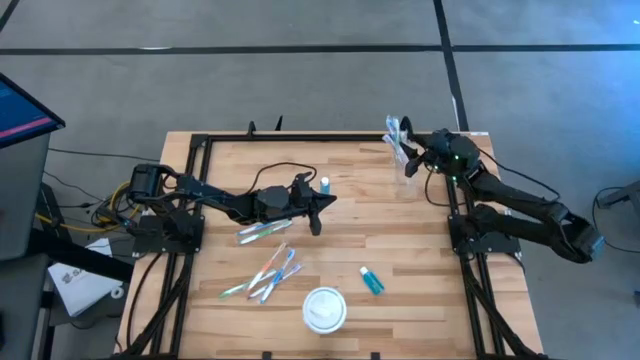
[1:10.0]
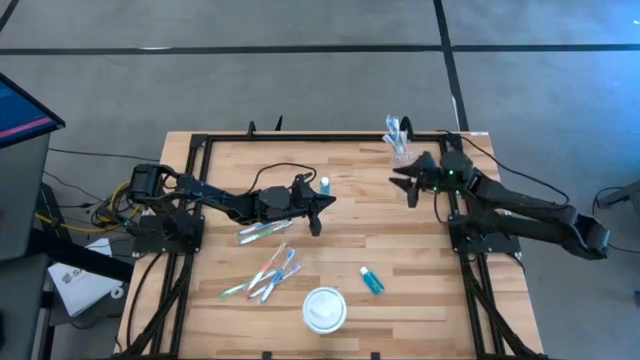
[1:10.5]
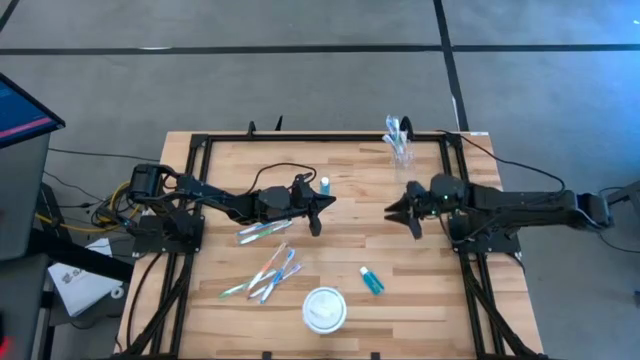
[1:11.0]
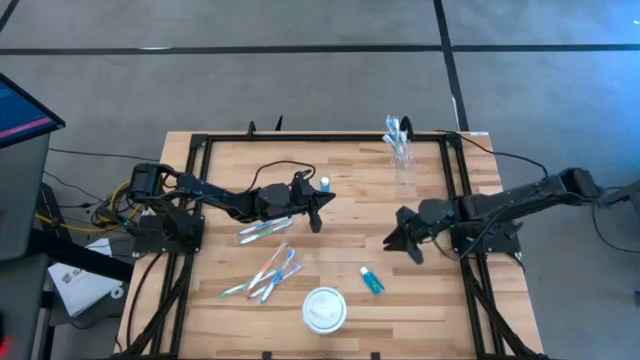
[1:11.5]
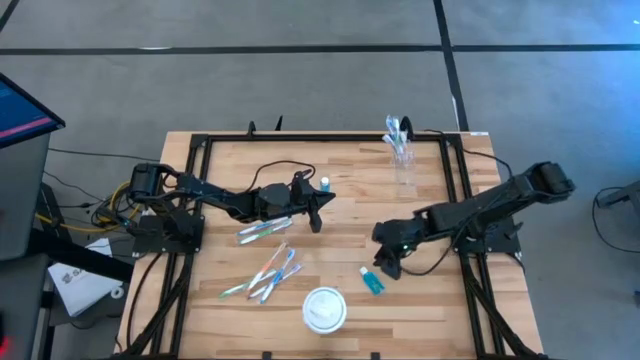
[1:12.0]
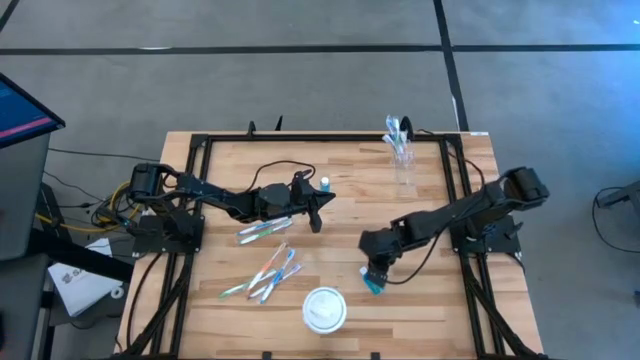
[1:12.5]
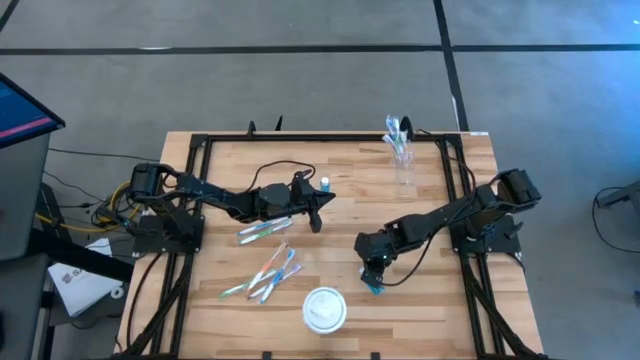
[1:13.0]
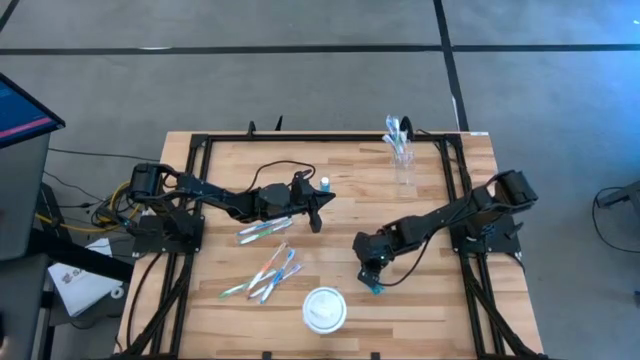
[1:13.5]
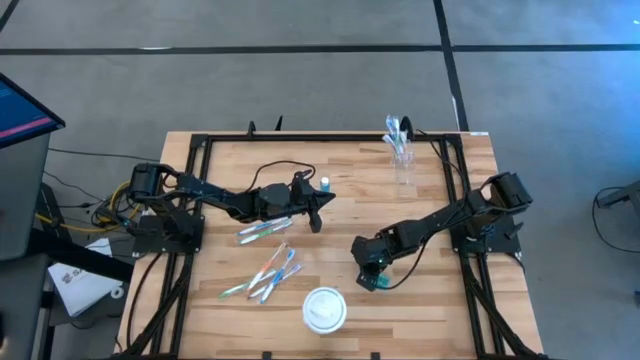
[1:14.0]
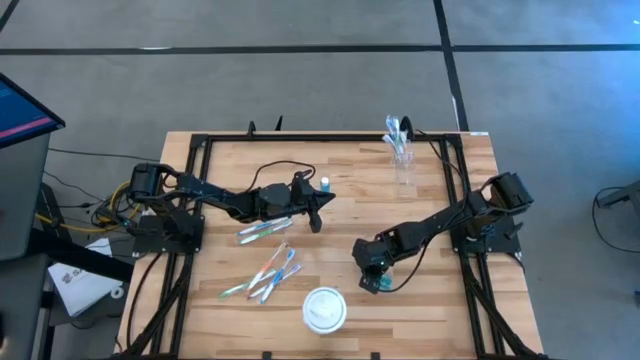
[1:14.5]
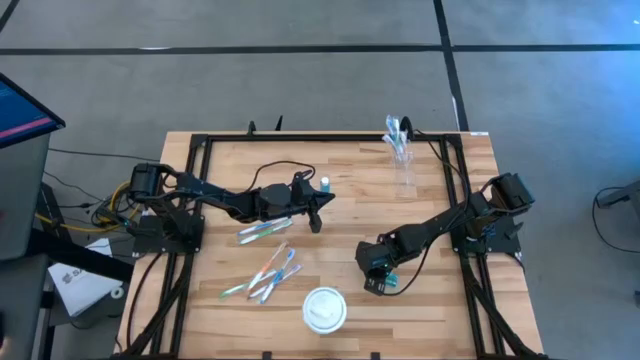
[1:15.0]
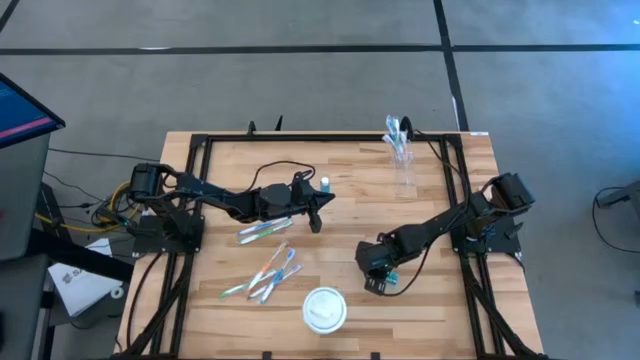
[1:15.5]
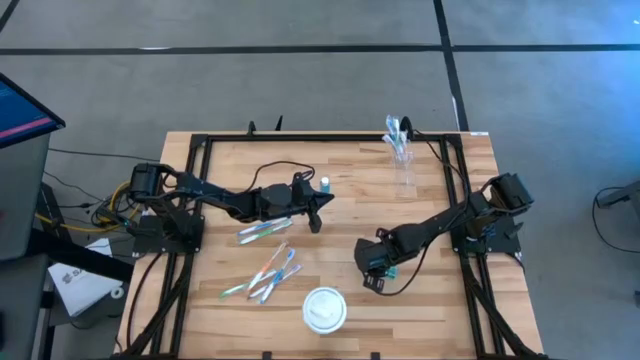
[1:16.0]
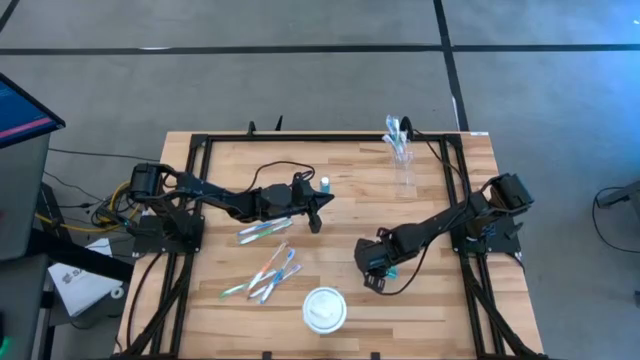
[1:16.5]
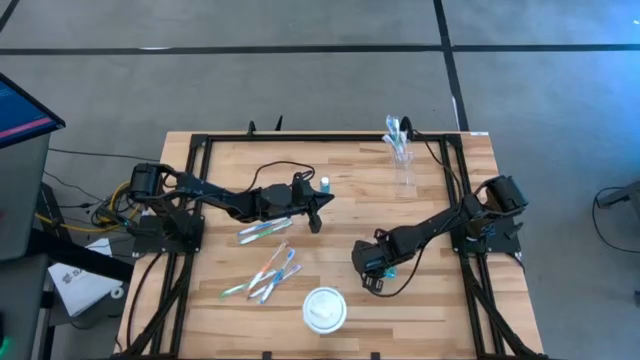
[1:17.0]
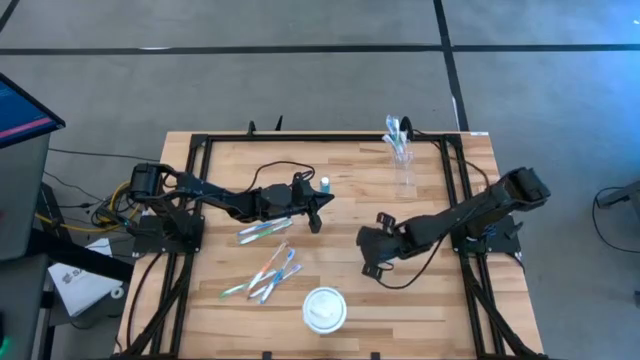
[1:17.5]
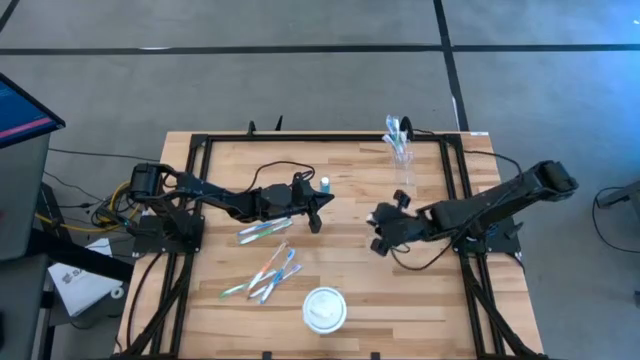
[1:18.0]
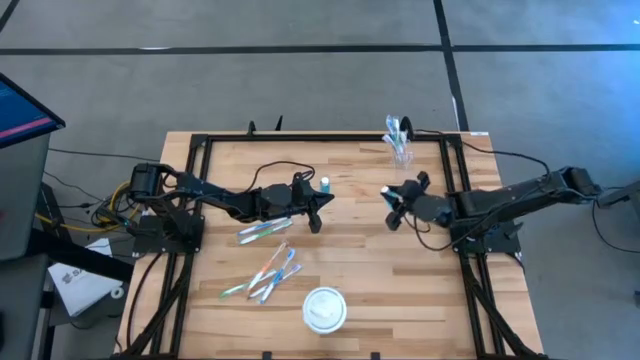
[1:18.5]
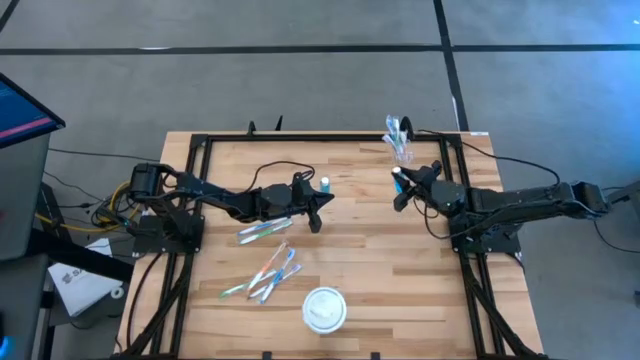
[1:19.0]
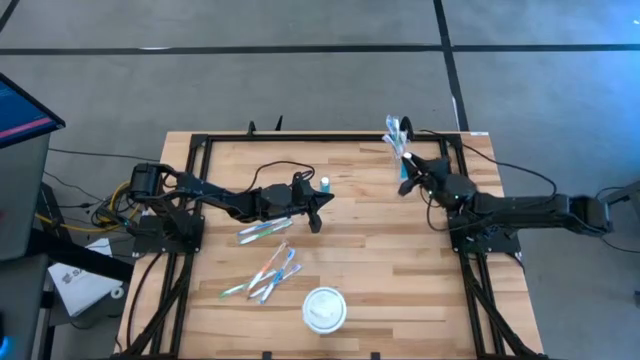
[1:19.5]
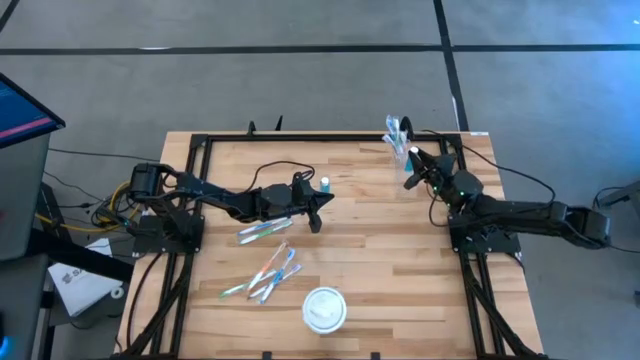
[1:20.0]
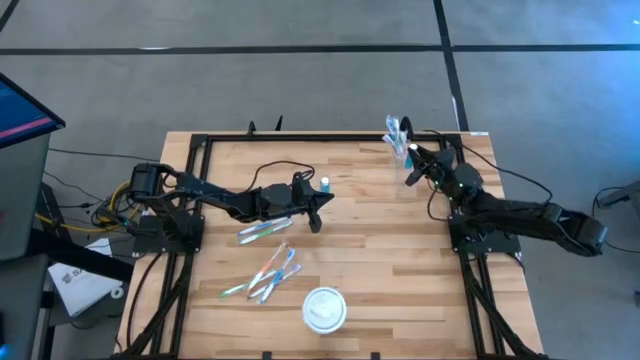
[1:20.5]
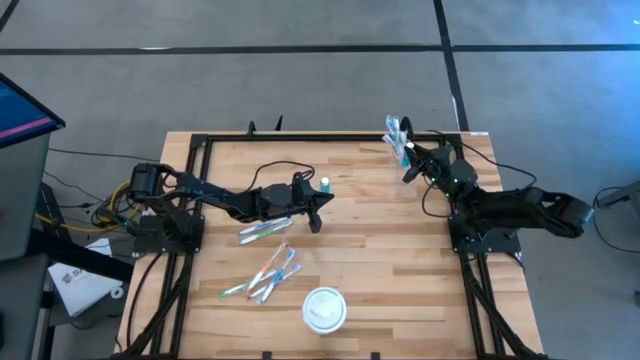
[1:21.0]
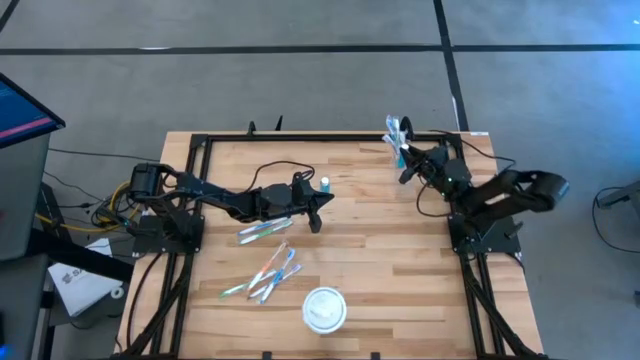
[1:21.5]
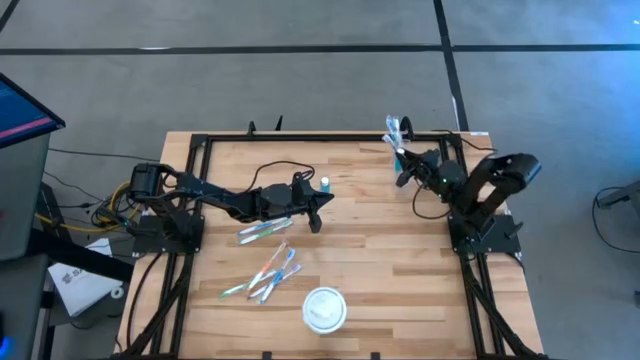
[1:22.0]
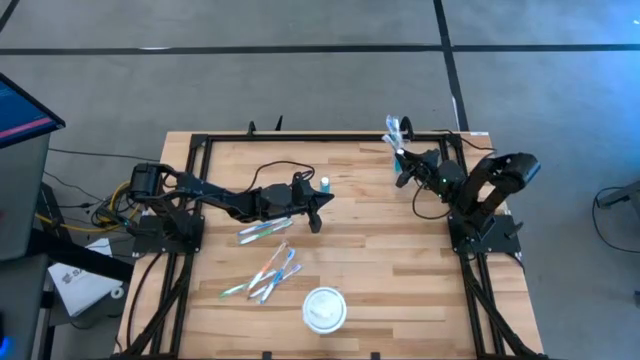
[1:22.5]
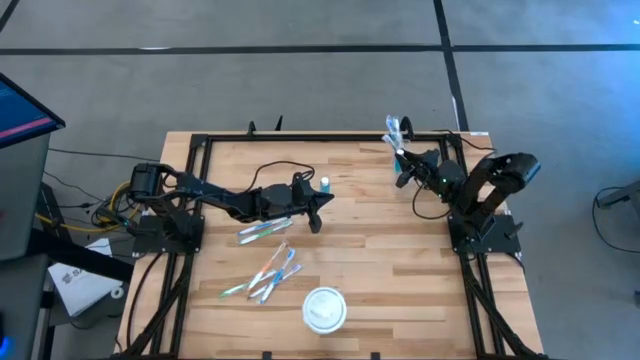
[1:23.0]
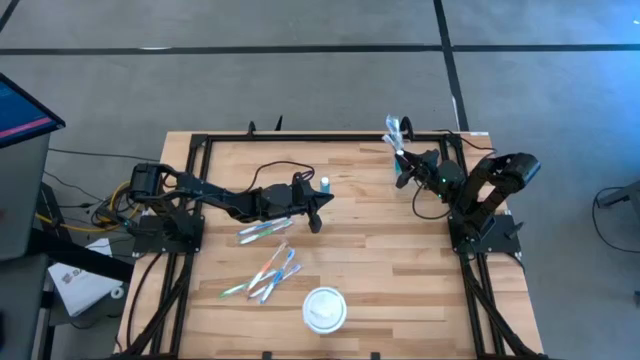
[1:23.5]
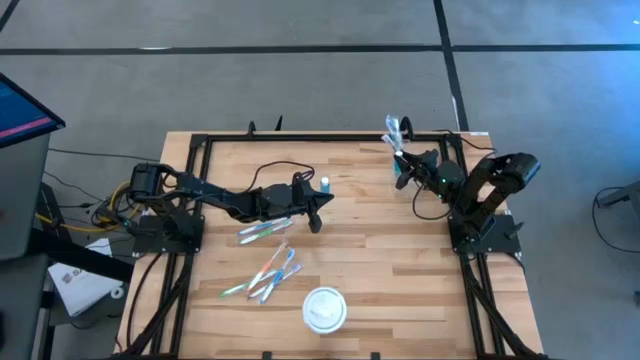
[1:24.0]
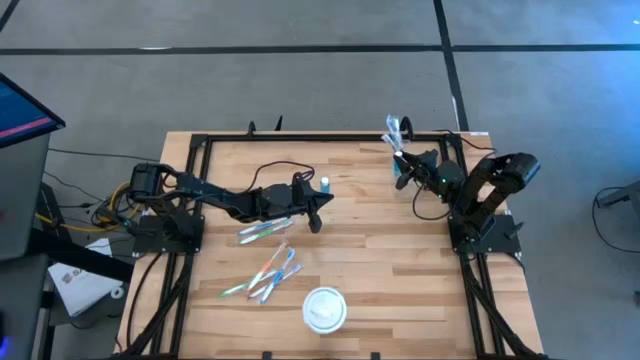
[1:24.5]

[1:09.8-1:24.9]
Task: Pick & Place toothbrushing station
Put the blue mouthwash into the transparent organizer

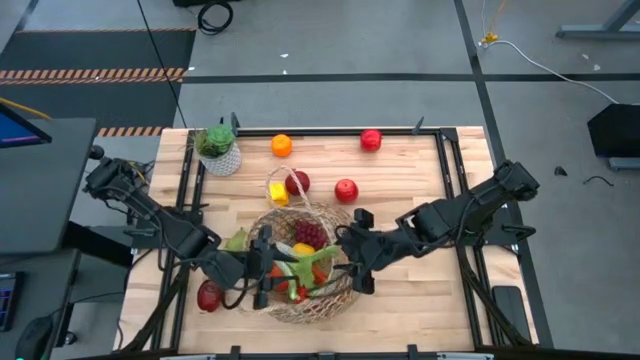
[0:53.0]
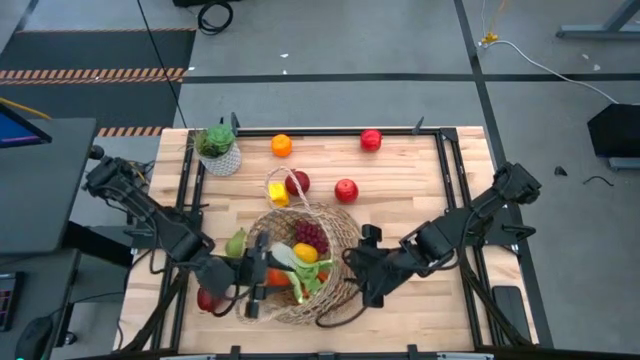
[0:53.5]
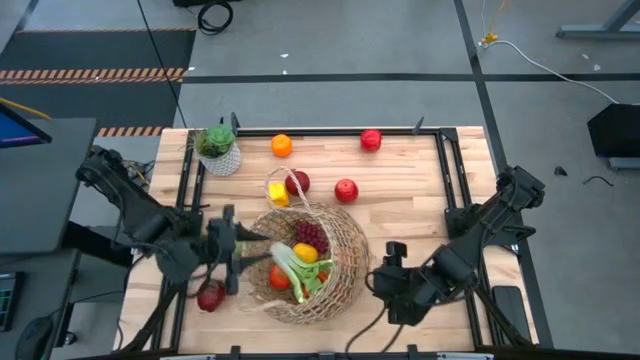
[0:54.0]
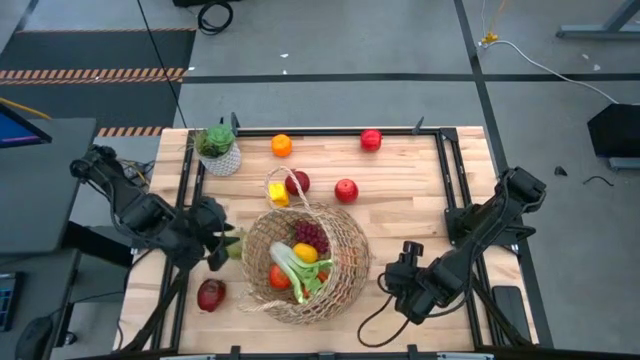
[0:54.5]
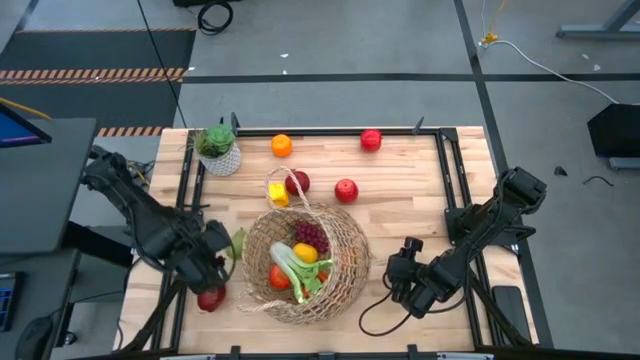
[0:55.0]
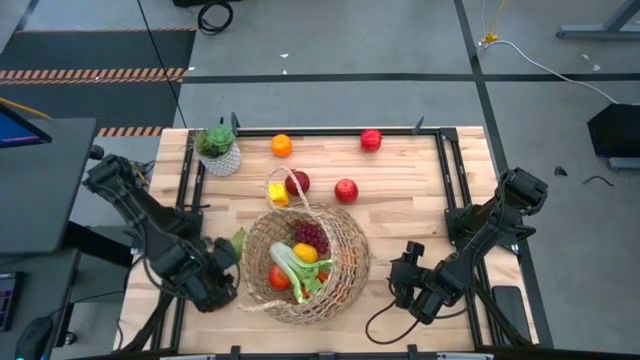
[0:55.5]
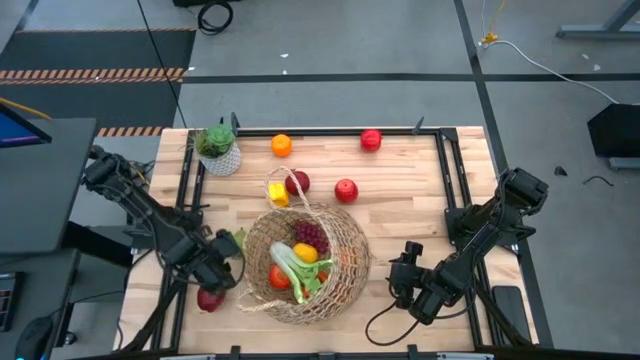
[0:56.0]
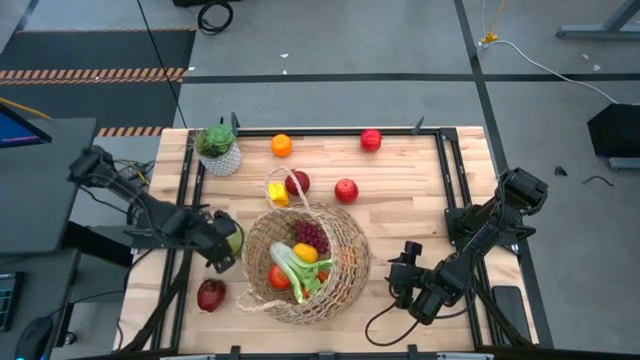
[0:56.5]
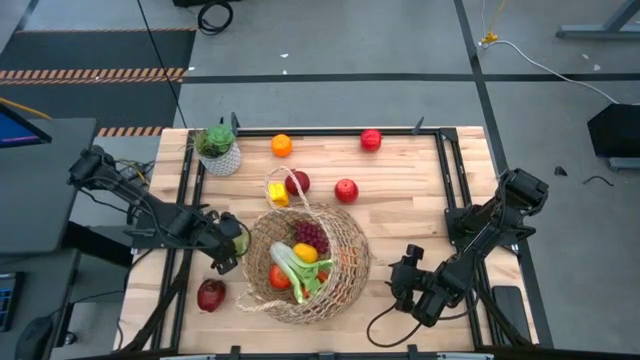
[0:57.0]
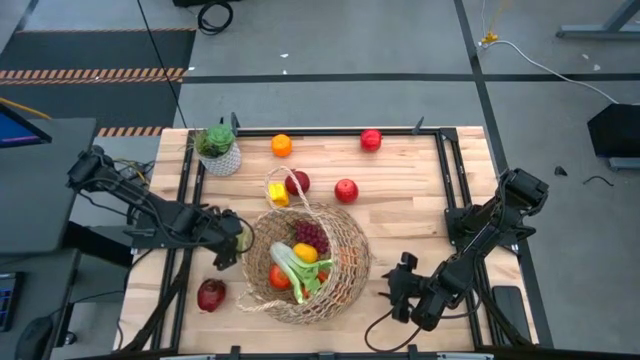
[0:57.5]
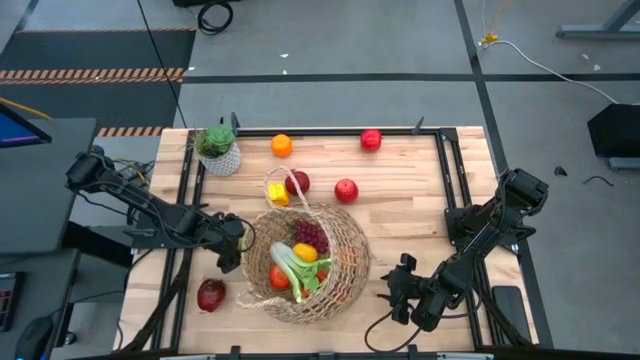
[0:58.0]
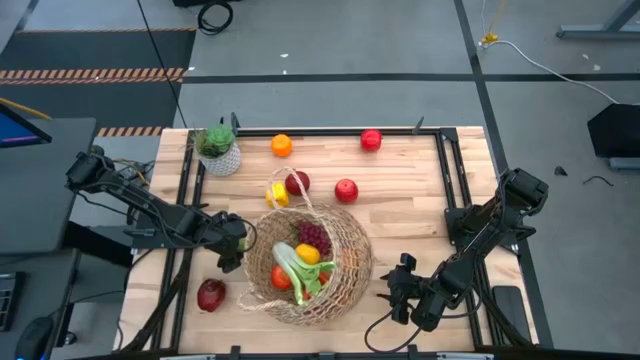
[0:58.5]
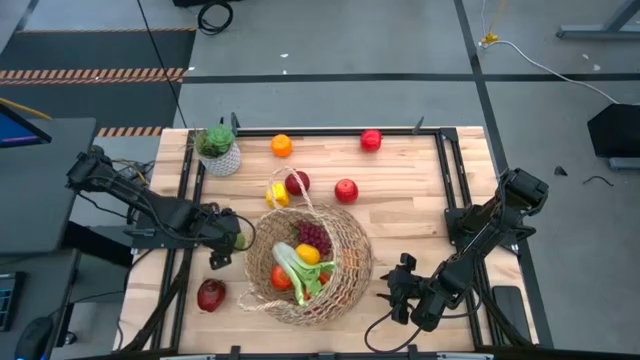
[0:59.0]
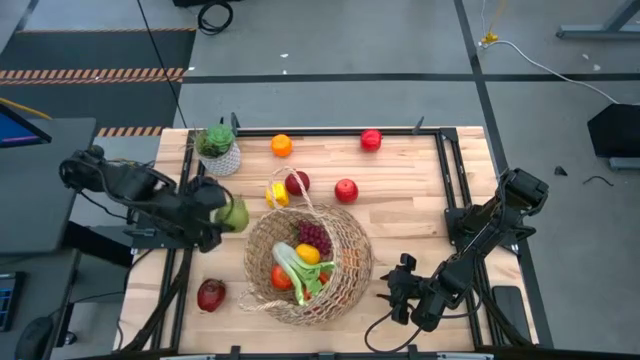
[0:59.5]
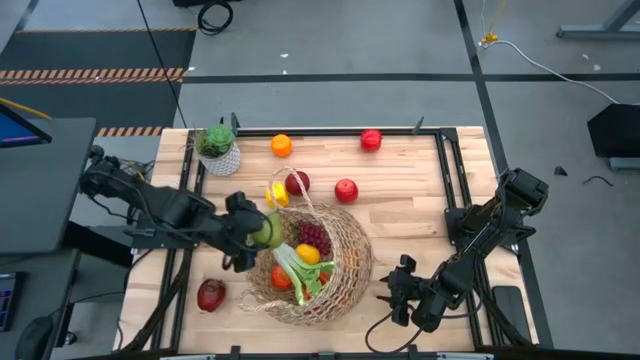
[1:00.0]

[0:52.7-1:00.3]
Task: Build produce basket
Put the pear into the basket
